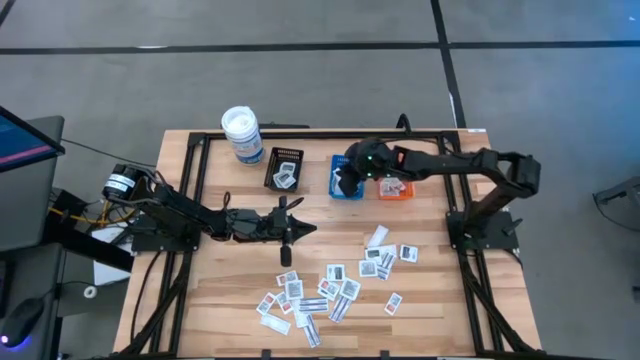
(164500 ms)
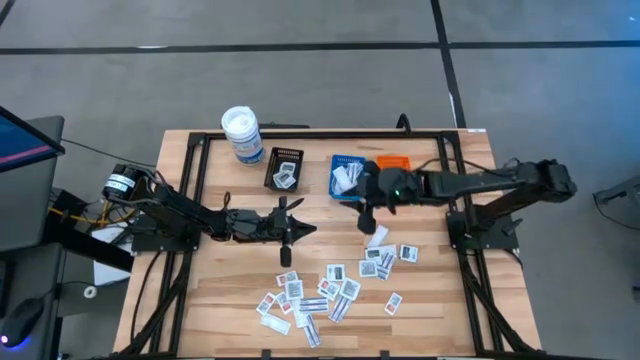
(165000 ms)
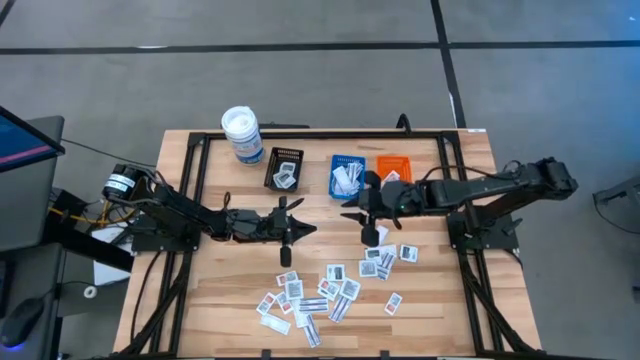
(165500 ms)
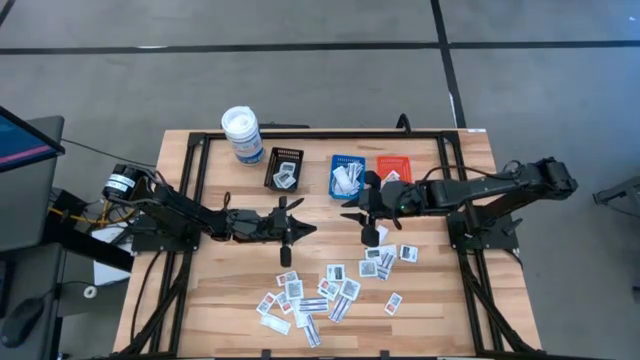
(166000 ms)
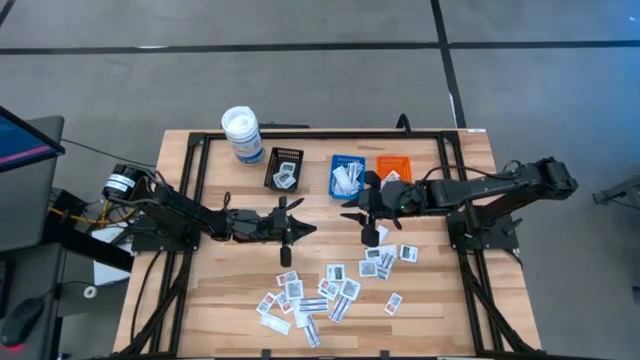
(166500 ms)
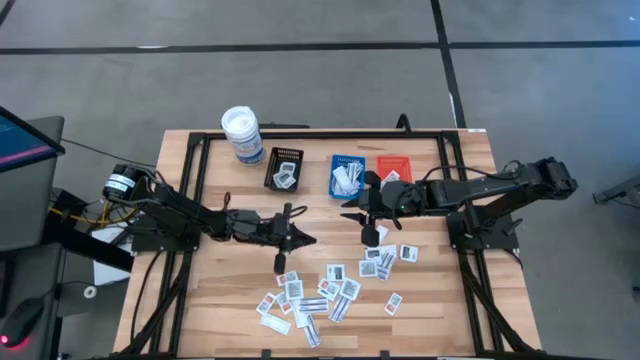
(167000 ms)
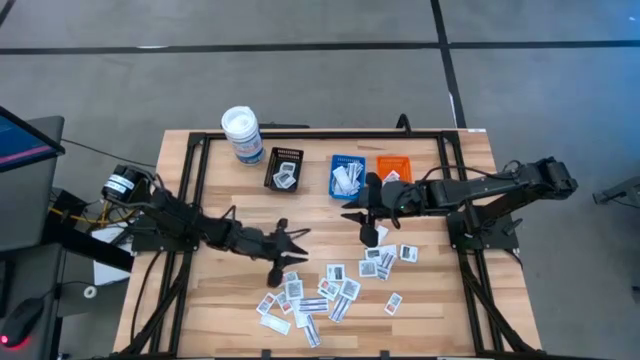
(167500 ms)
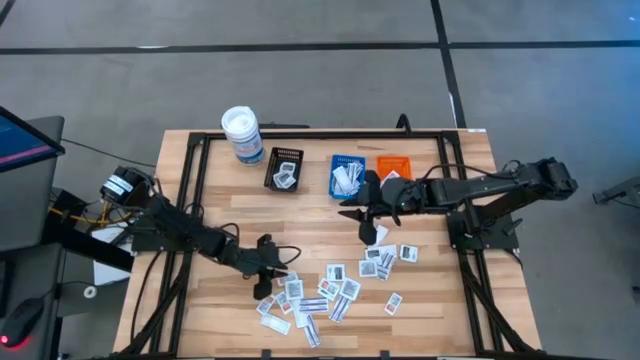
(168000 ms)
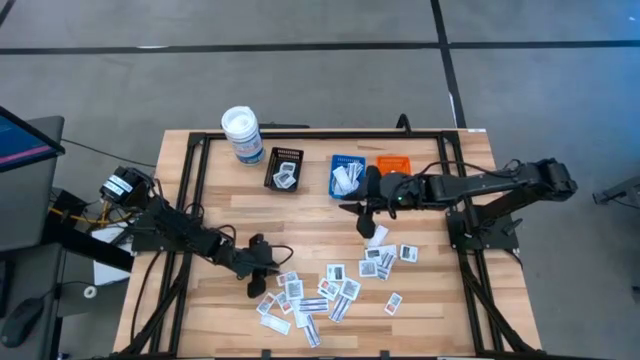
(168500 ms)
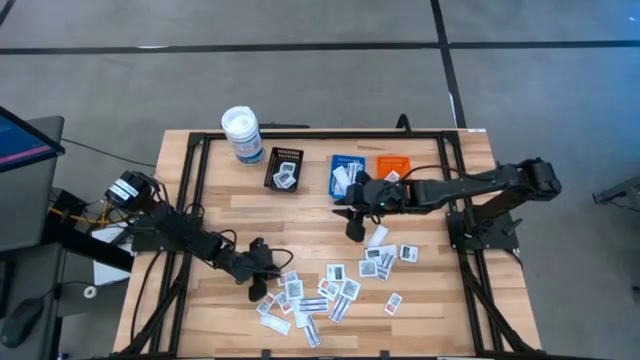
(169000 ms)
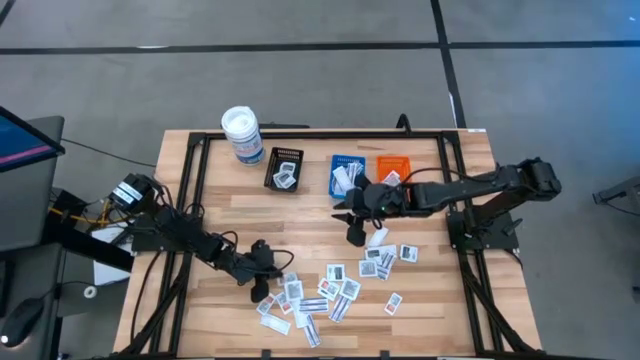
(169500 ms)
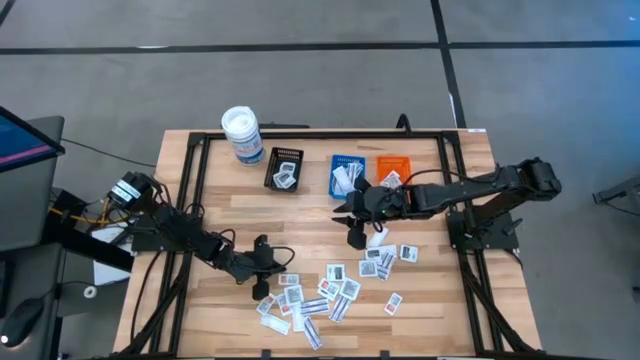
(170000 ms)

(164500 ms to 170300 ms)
Task: Pick & Place First Aid Supplies
Put the orange ointment pack into the orange bin

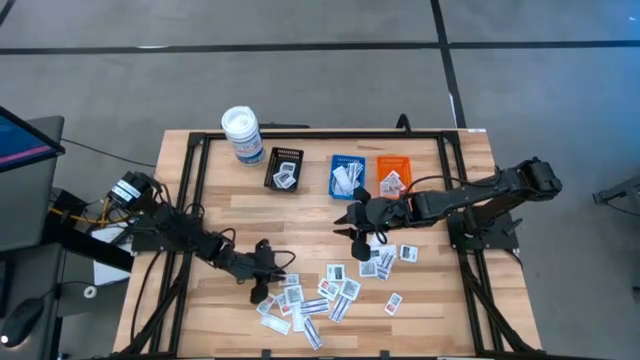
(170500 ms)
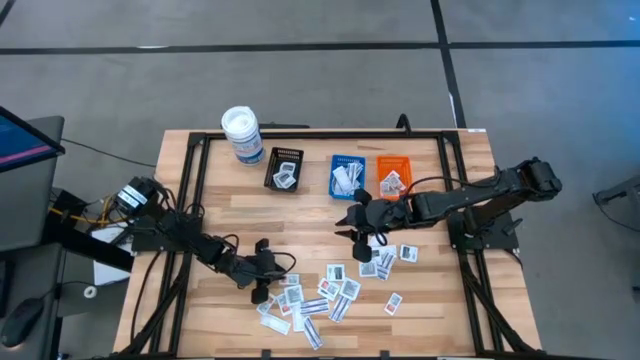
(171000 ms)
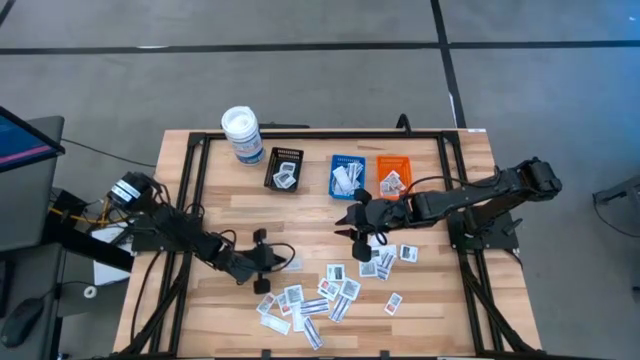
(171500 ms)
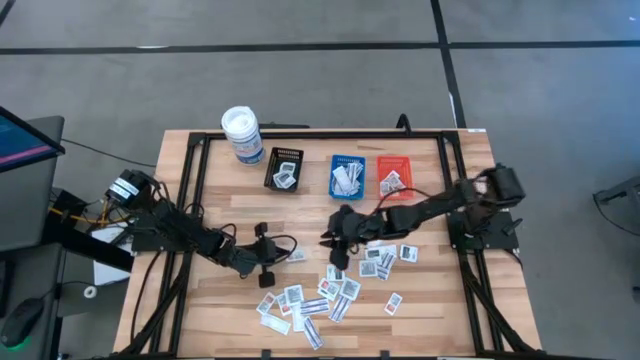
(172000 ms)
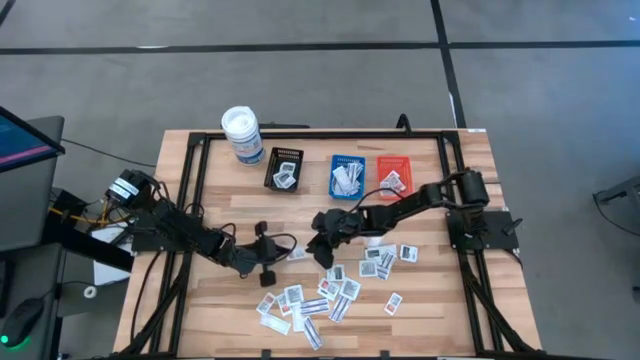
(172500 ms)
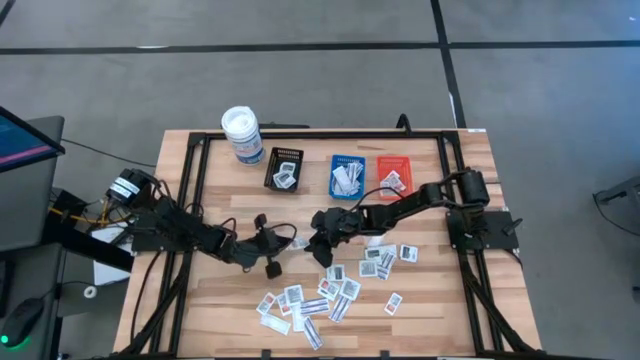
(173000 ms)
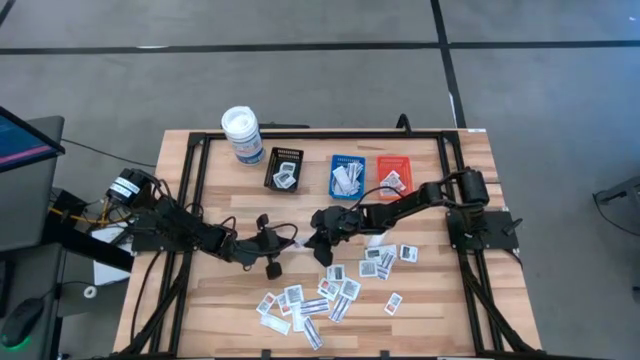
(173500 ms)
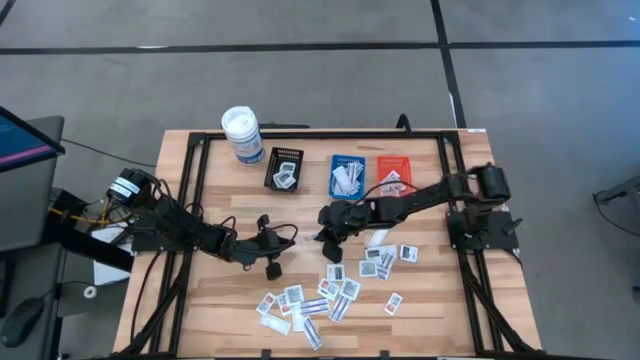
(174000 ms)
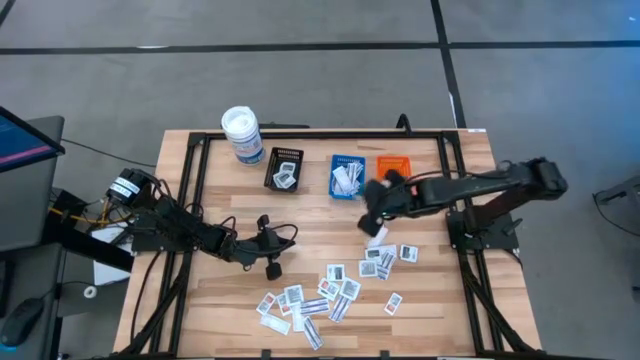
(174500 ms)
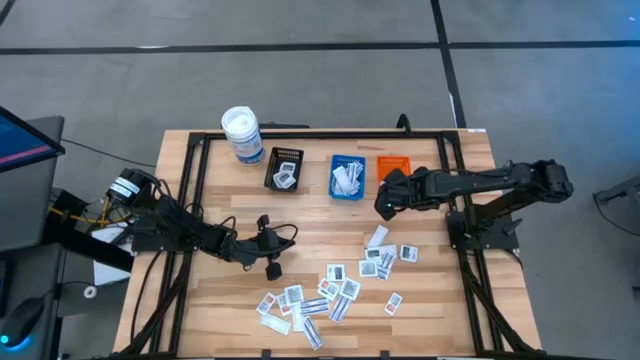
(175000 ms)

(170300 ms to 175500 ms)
Put the orange ointment pack into the orange bin

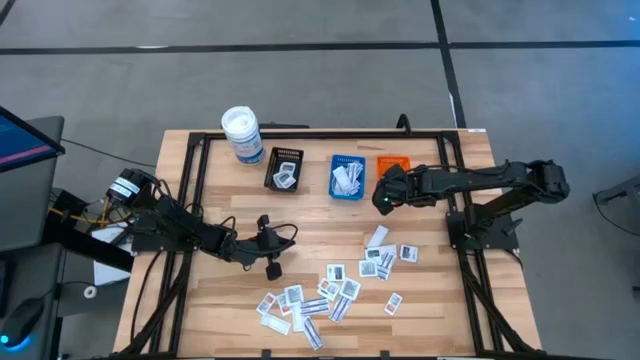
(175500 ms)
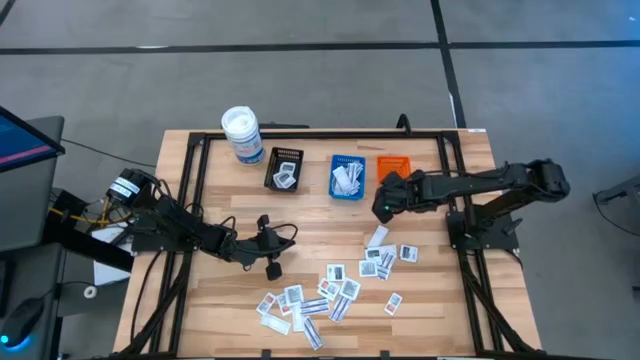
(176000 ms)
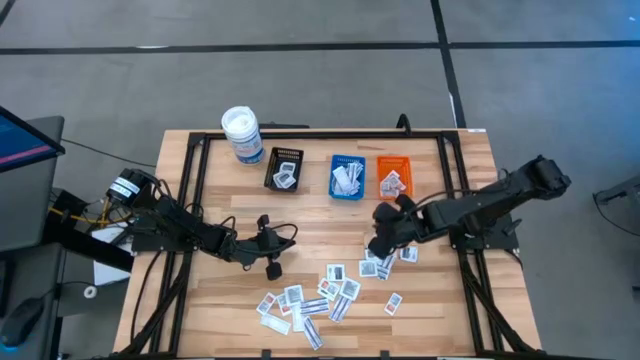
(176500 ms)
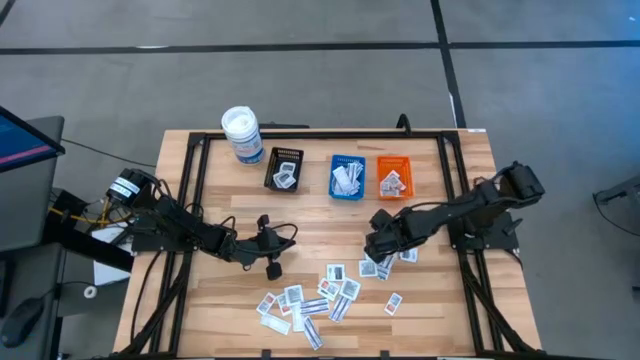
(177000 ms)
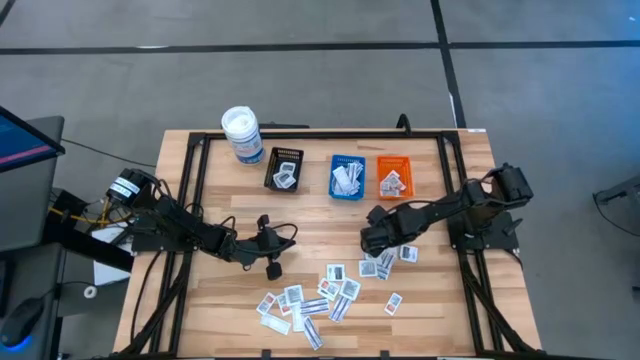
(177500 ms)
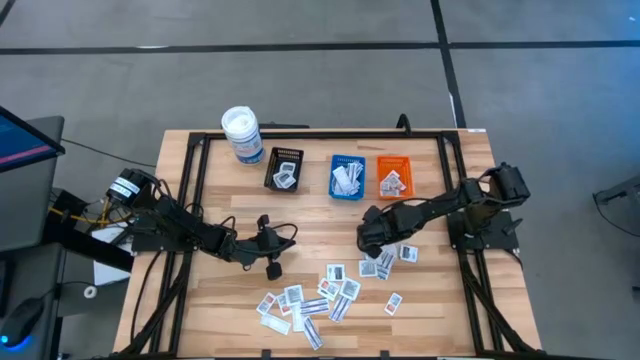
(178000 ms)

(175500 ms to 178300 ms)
Put the blue bandage into the blue bin

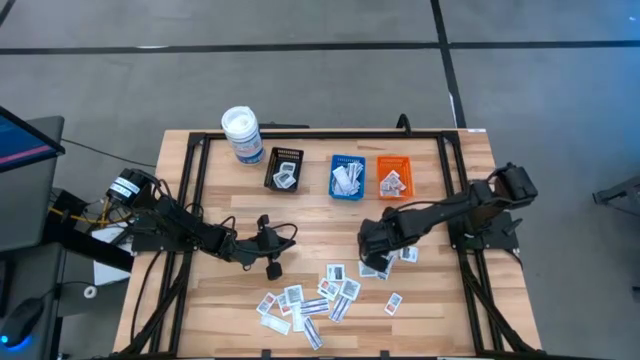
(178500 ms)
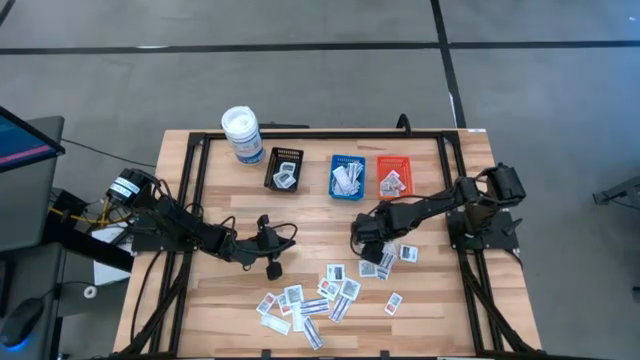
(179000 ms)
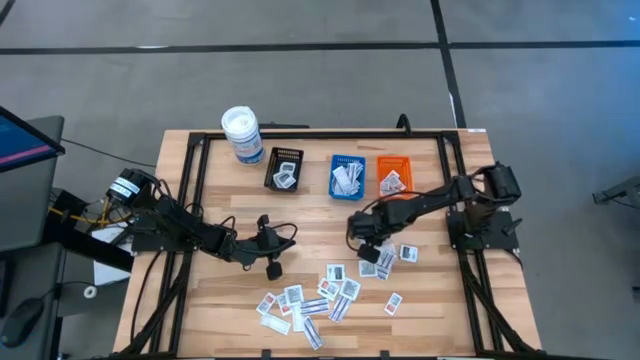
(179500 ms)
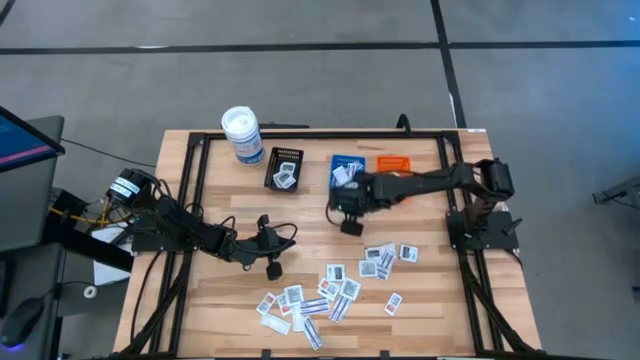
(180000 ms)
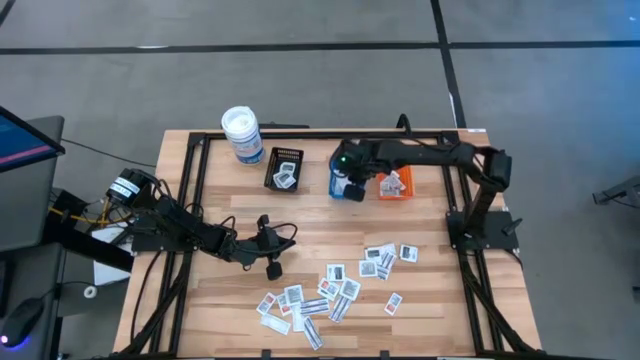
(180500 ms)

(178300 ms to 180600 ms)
Put the blue bandage into the blue bin

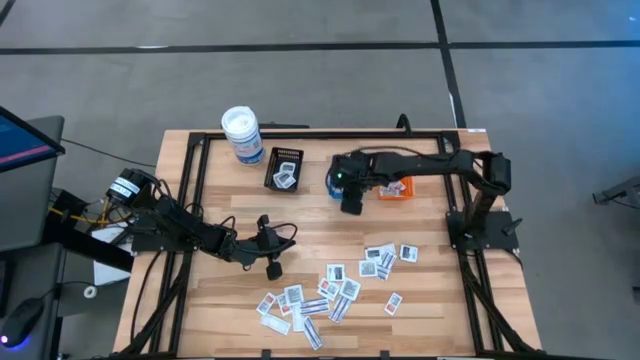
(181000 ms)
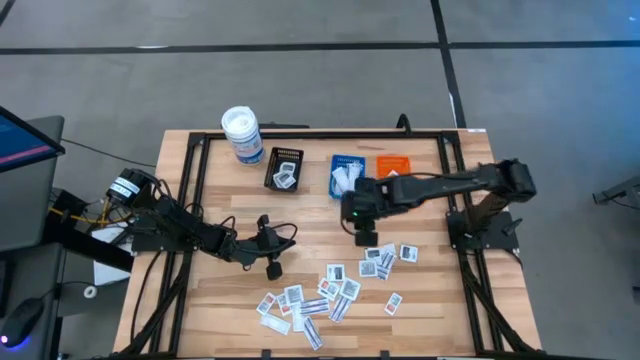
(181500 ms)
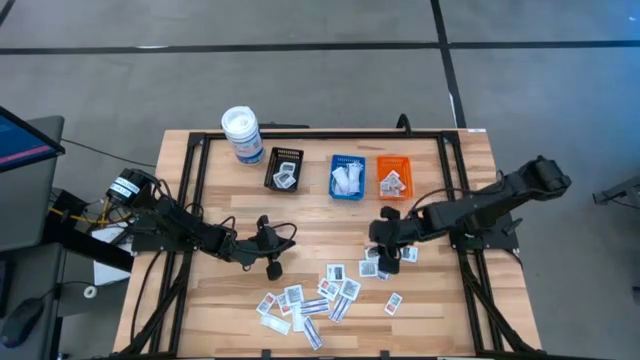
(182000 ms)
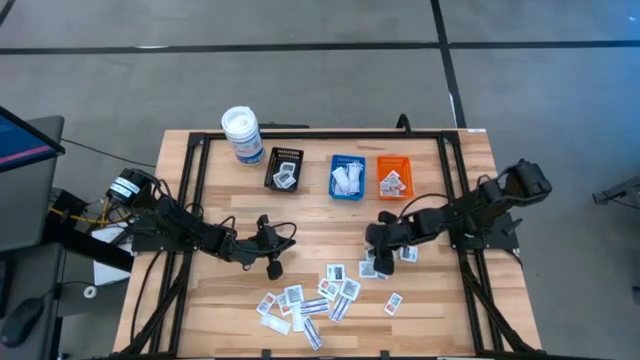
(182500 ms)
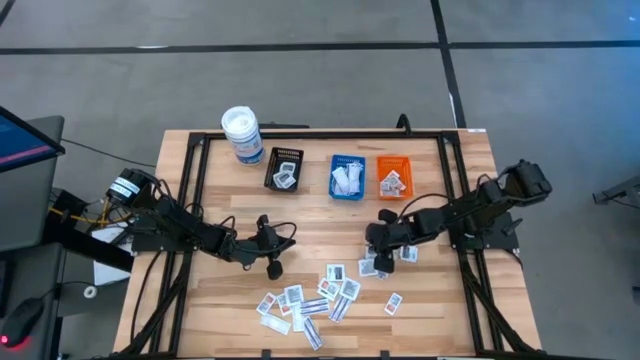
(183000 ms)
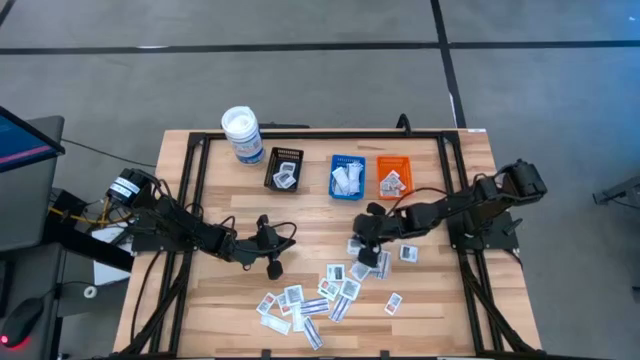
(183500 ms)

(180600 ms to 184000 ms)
Put the black towelette pack into the black bin

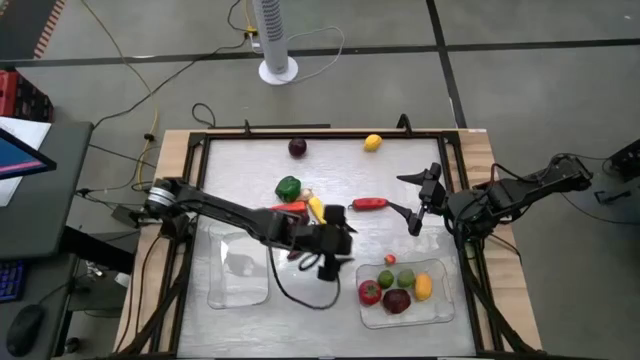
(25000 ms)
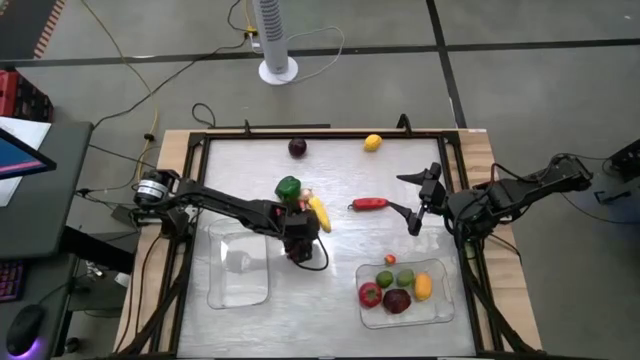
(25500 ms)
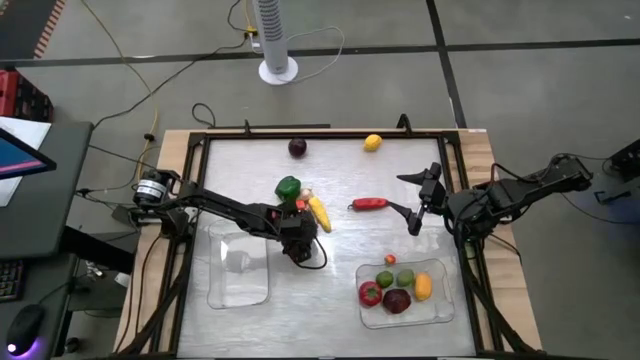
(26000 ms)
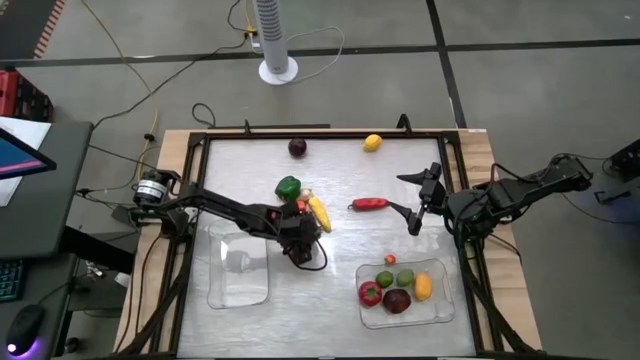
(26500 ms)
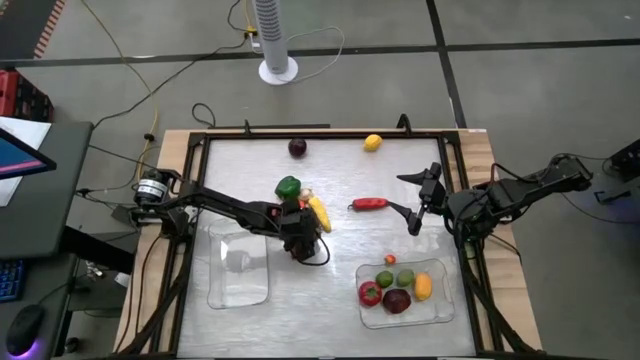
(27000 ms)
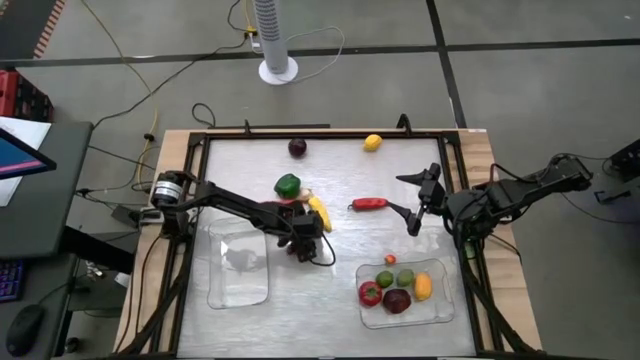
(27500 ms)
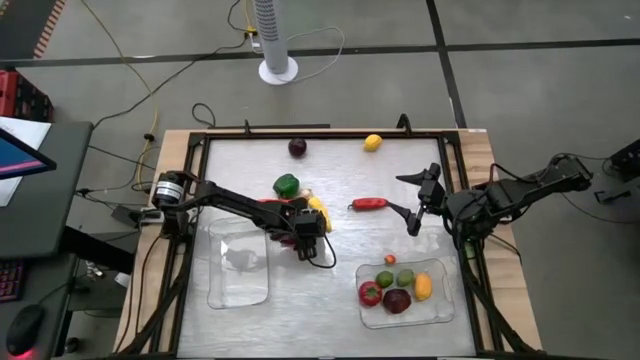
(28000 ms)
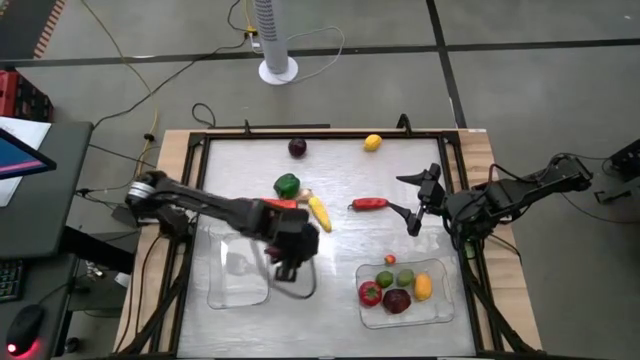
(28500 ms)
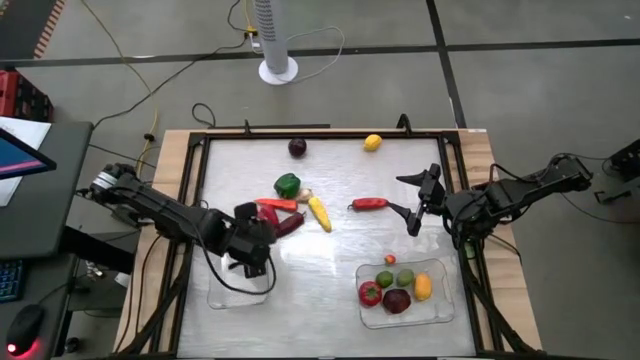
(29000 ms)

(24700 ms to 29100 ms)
Task: Sort produce into baskets
Put the bottom red chili pepper into the left transparent bin
